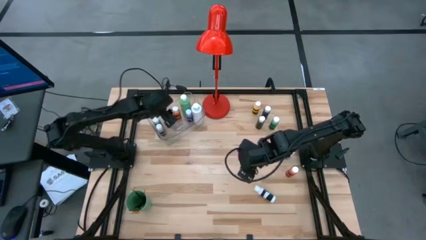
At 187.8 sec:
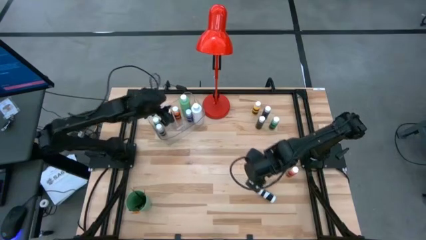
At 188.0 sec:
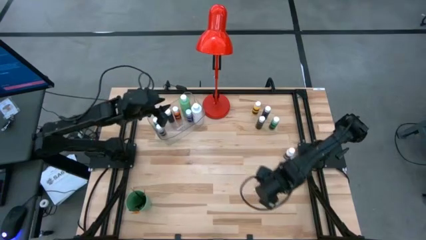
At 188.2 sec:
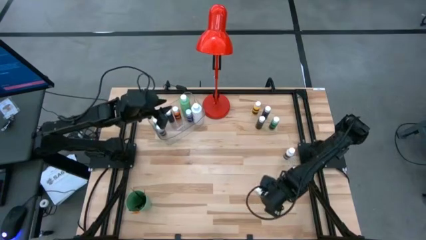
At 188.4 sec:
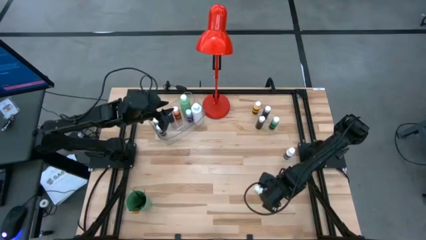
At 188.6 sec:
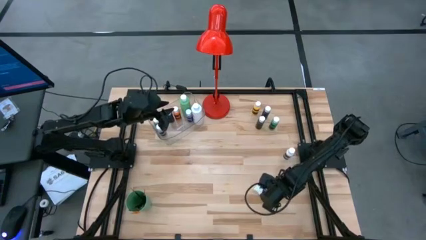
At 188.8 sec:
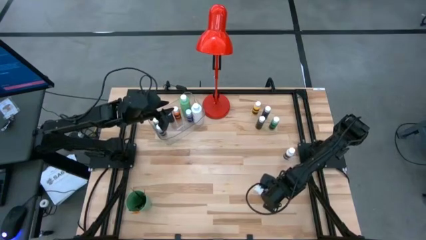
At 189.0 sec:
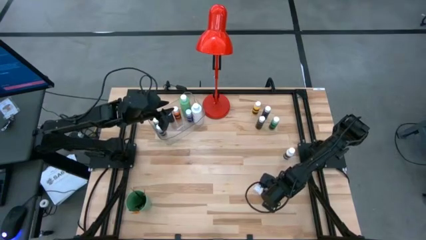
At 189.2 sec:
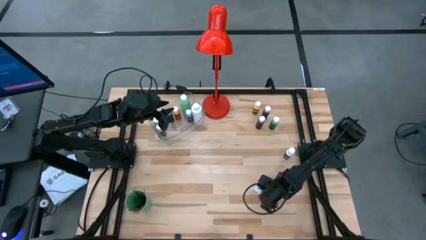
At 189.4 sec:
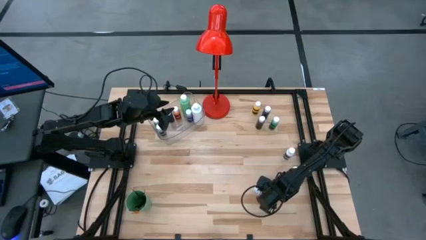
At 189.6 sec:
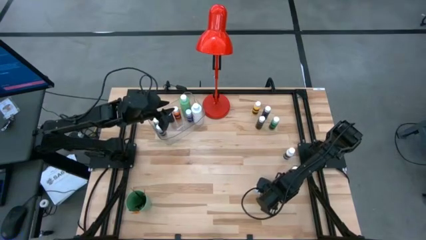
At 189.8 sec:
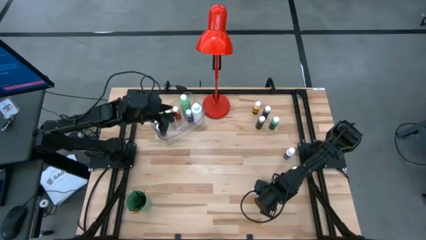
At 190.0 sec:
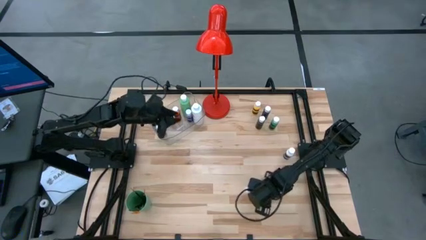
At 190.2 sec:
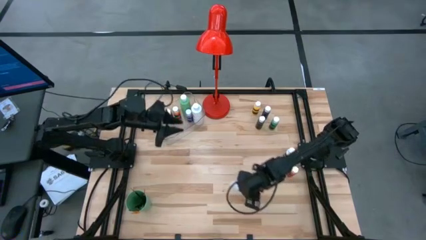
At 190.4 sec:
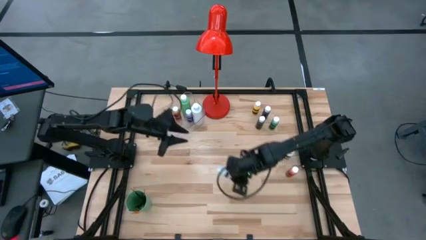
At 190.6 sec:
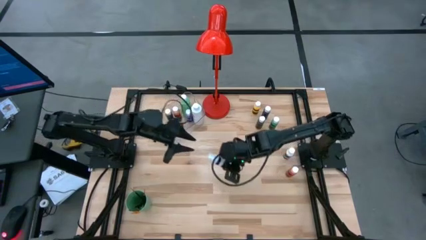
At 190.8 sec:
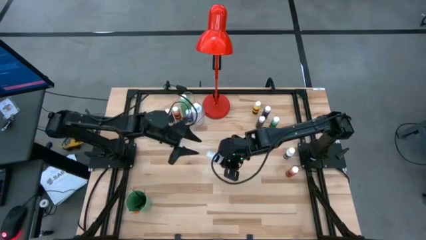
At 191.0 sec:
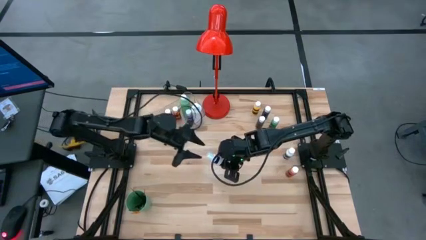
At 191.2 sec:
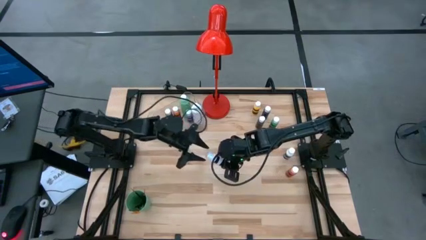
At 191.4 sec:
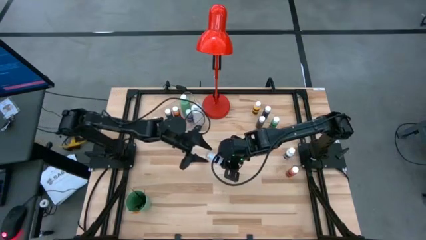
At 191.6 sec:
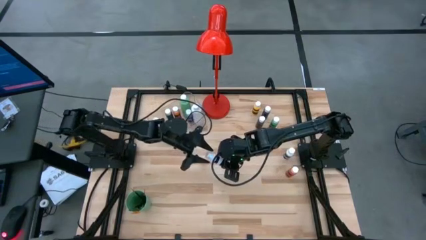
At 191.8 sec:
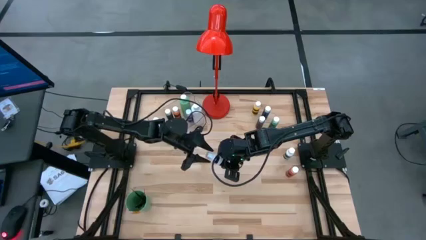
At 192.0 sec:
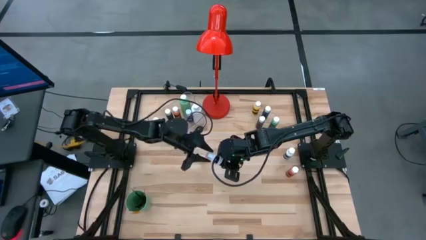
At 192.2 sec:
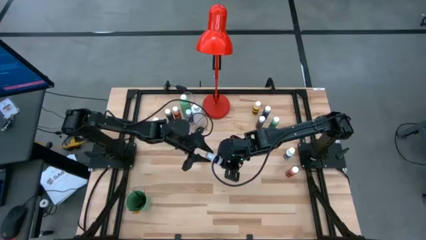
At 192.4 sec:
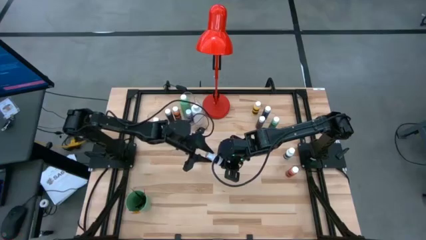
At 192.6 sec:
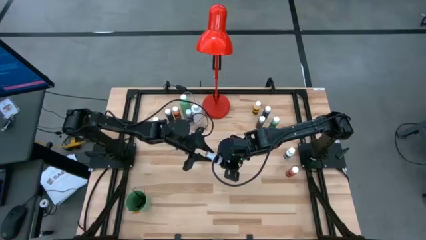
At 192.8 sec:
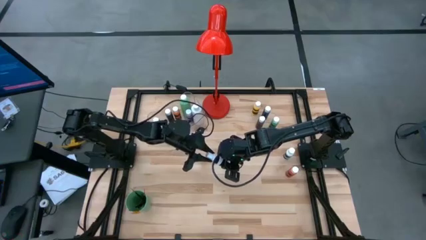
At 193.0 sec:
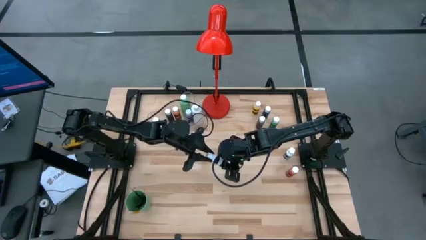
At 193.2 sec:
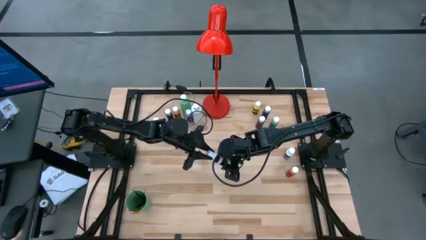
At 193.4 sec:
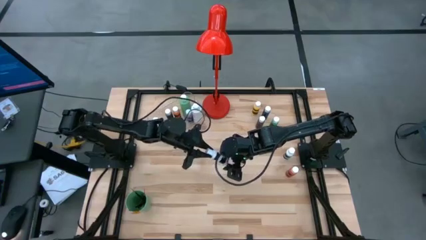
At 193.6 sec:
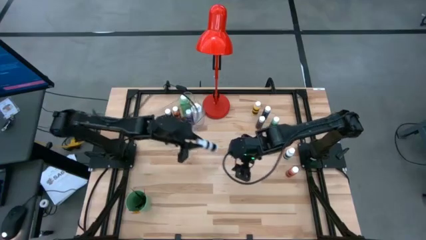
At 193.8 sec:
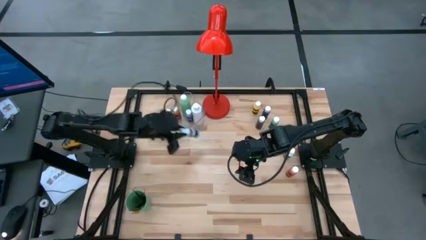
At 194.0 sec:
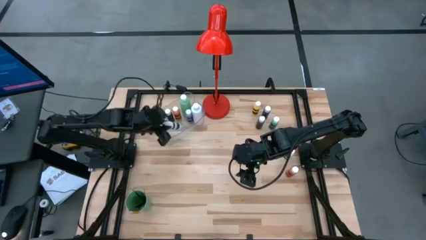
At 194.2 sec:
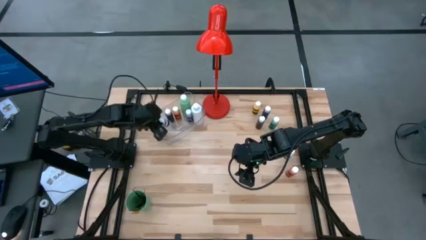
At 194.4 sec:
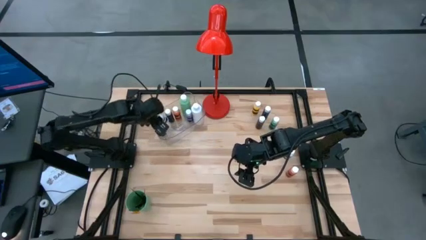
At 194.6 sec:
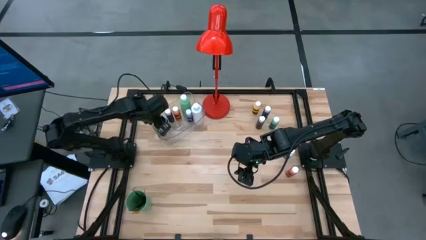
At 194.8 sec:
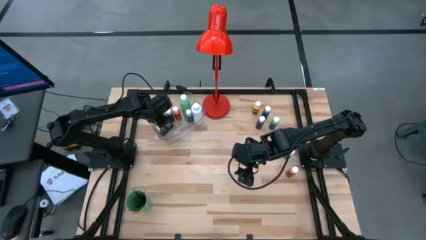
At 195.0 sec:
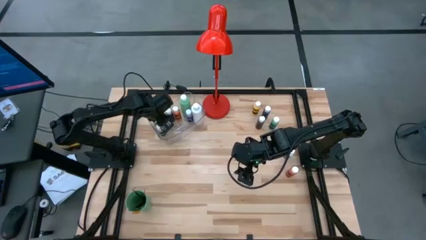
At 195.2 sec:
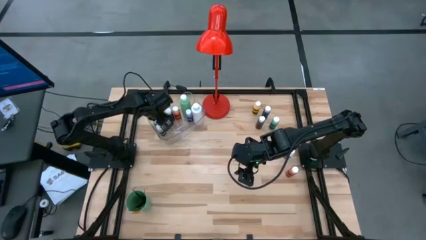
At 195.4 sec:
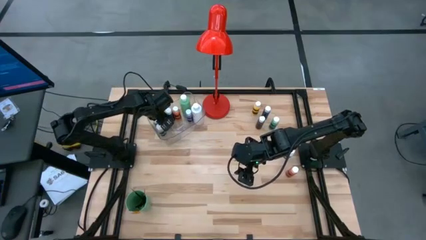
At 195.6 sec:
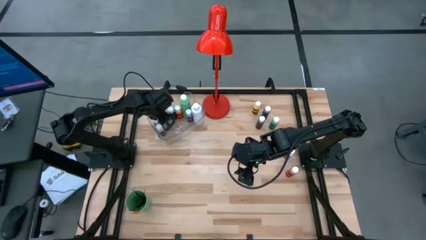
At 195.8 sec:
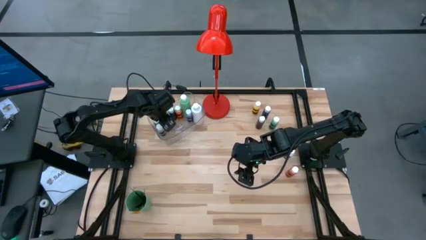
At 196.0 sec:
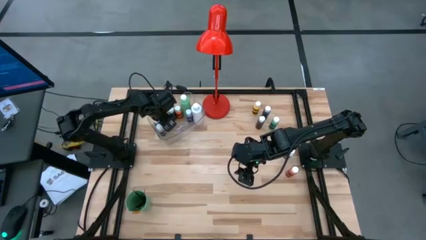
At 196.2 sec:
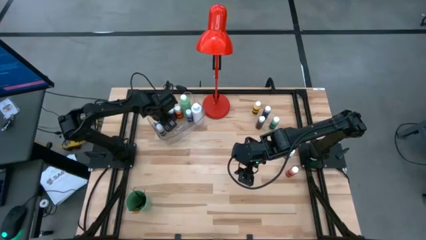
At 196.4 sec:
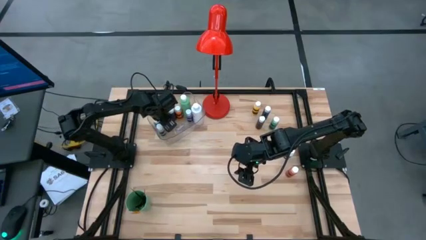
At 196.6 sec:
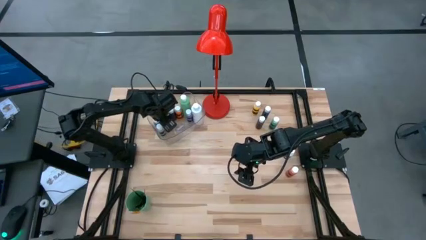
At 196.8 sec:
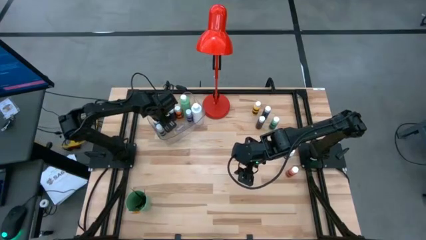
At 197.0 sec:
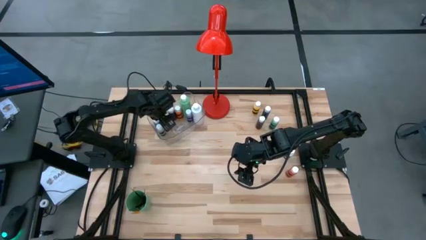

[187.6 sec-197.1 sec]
Task: Pick & Place Paint Supplies
Put the white paint bottle into the transparent bin
